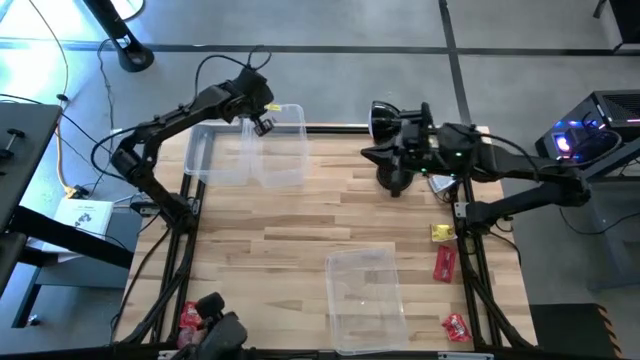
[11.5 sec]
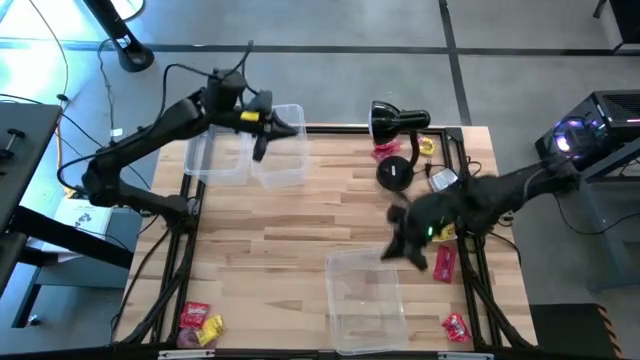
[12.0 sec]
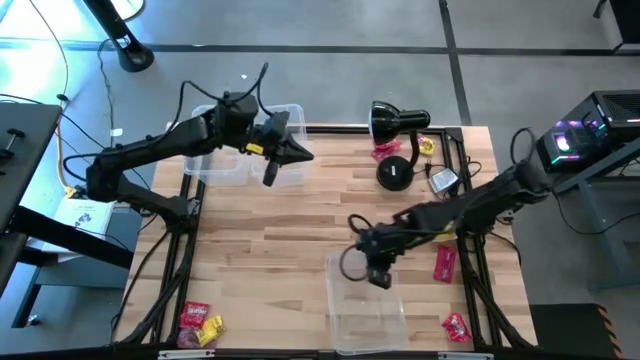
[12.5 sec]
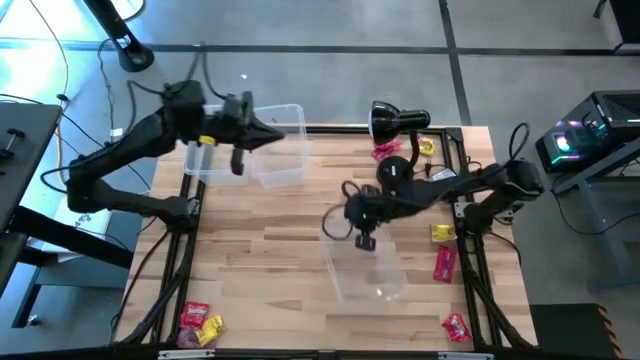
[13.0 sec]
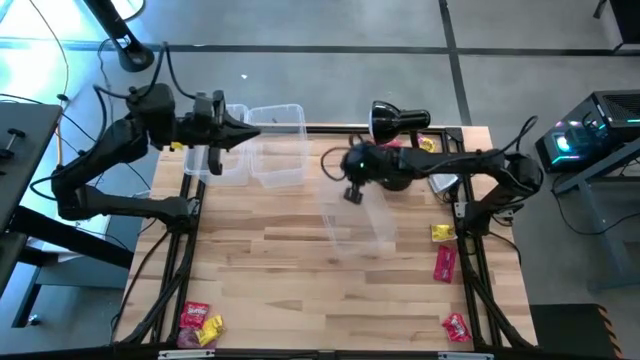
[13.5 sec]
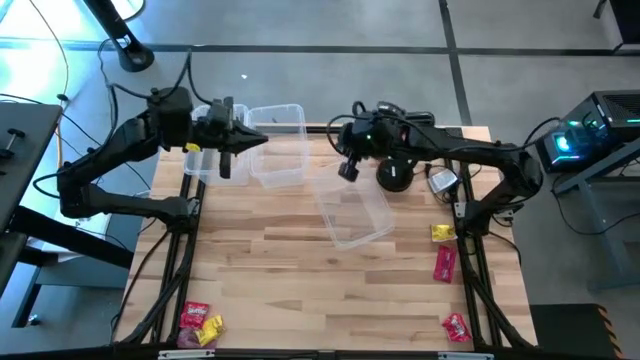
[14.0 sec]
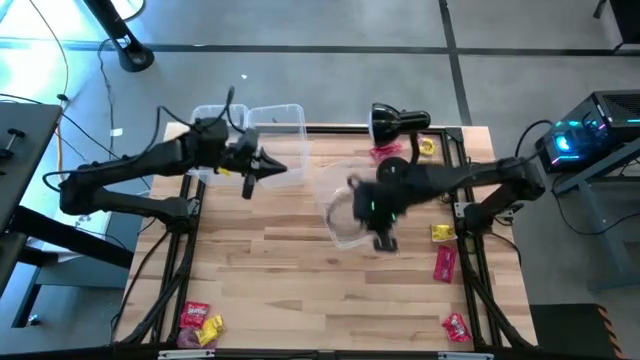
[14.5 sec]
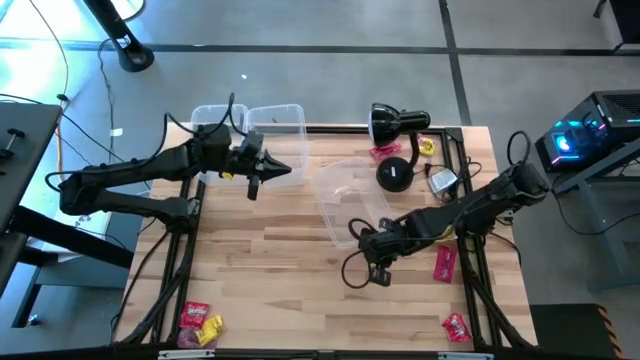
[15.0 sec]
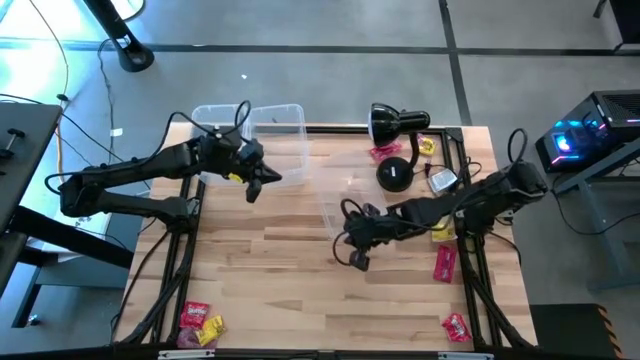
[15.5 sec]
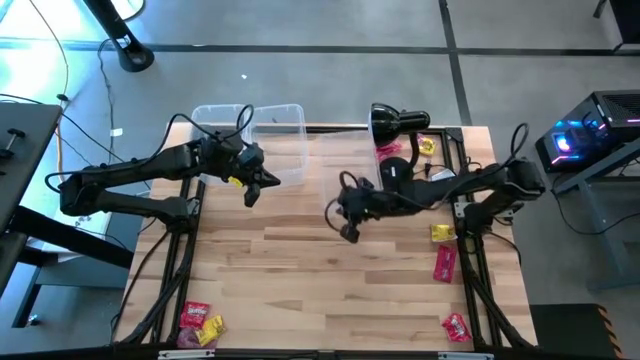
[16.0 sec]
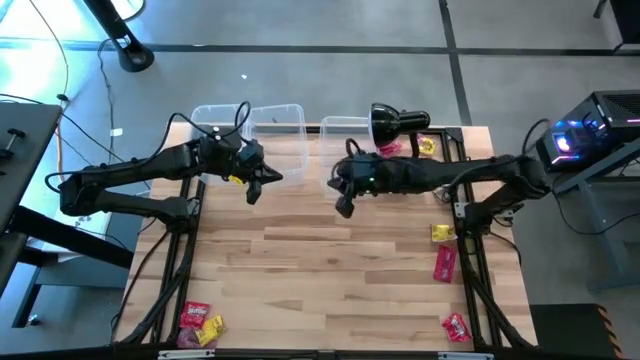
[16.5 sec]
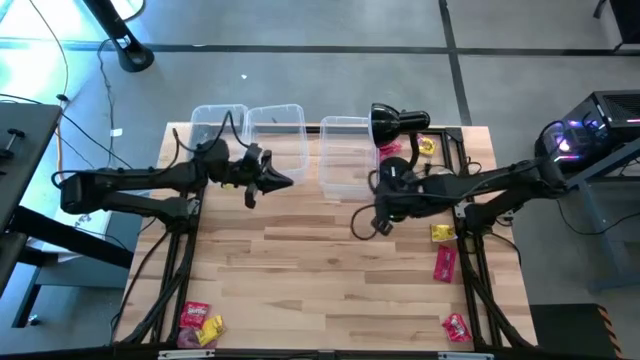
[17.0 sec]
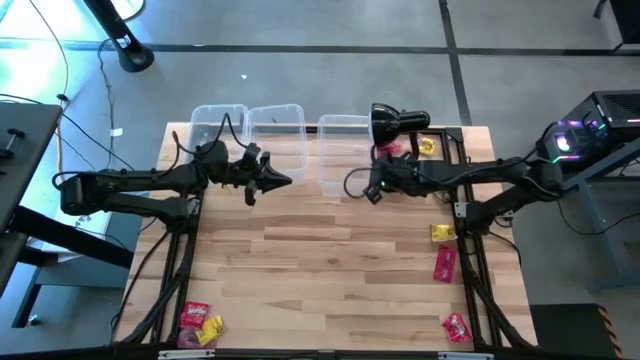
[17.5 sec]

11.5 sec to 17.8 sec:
Task: Sort candy
Move the bottom transparent bin to the top center of the table

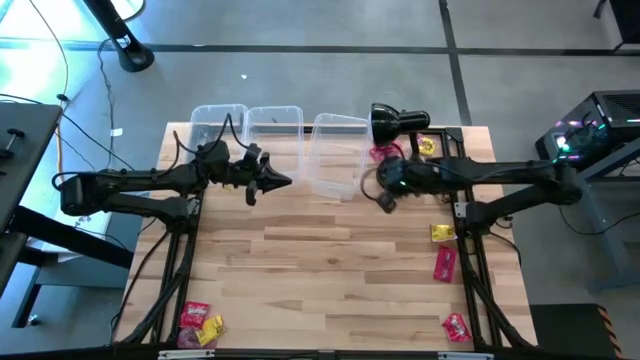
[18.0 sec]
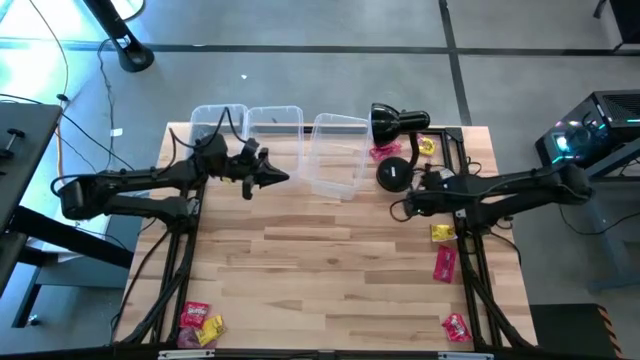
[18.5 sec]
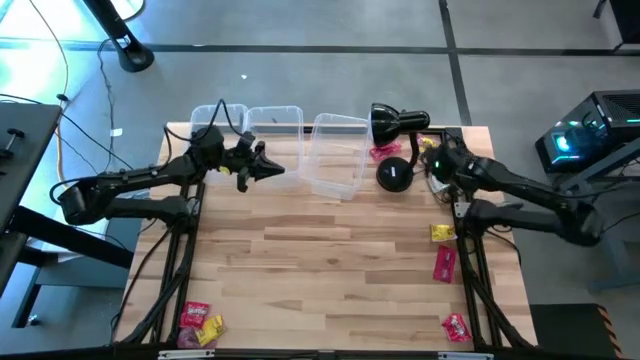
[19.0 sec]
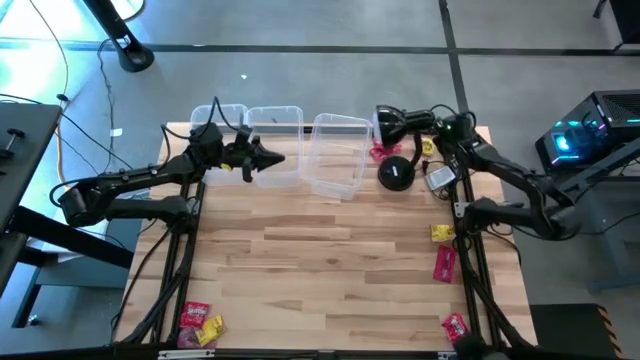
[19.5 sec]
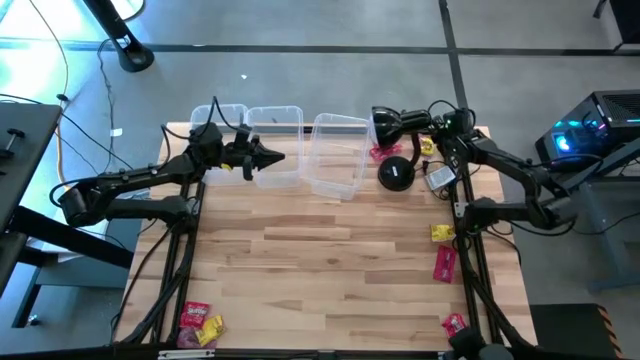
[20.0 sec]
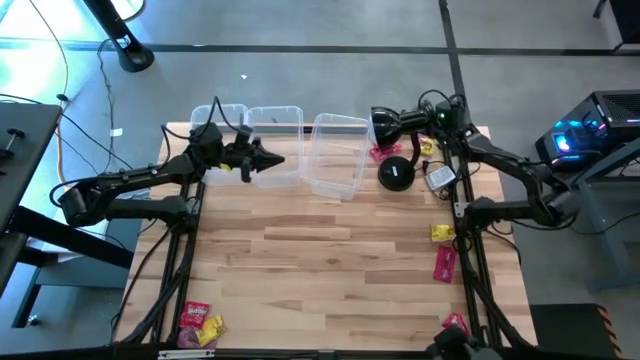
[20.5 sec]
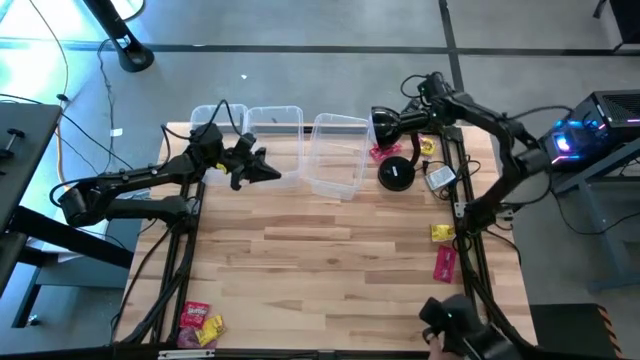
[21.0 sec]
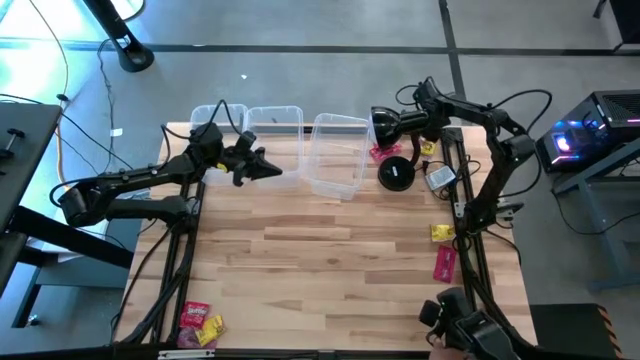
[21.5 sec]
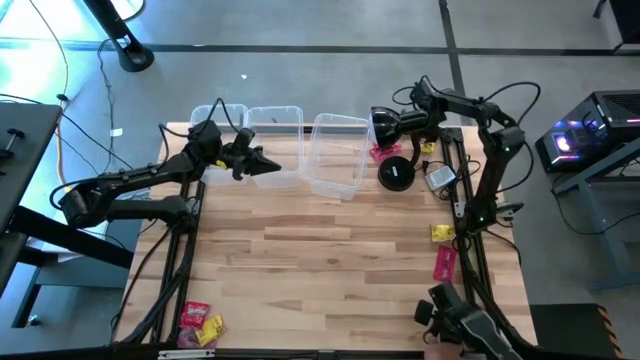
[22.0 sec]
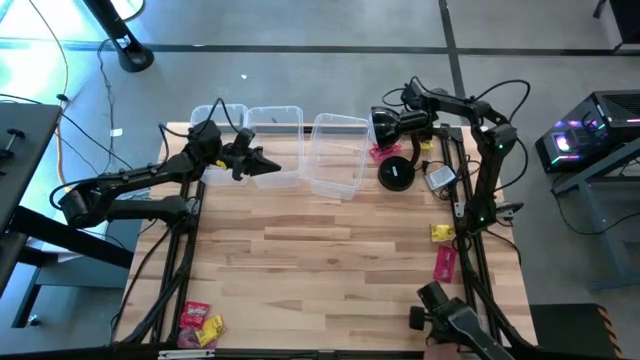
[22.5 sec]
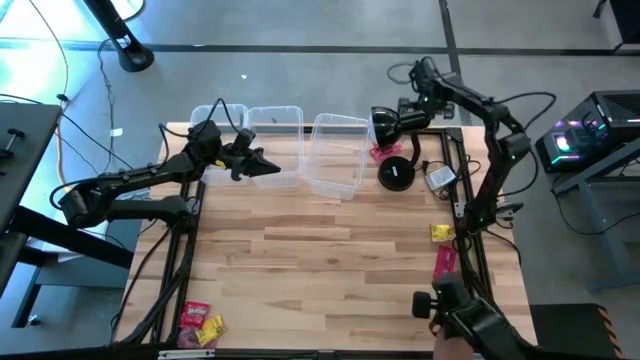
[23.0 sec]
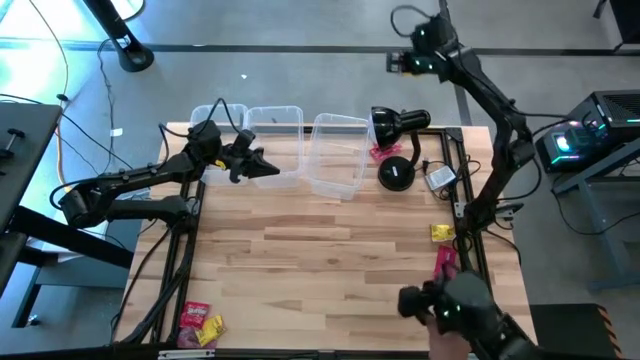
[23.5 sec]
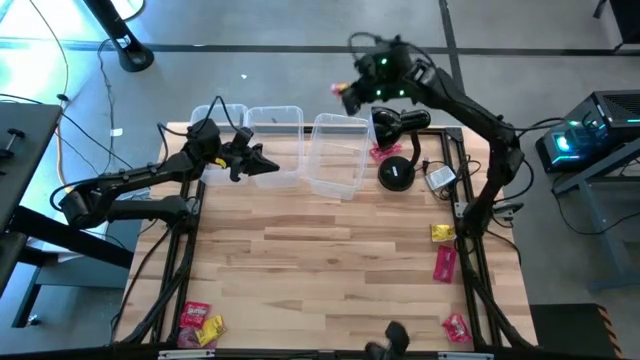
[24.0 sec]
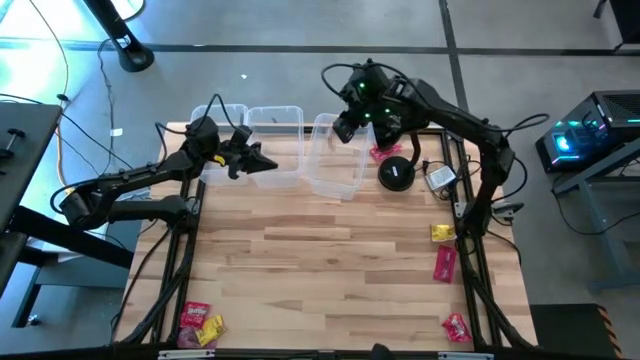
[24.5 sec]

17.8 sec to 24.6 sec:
Put the yellow candy wrapper into the right transparent bin

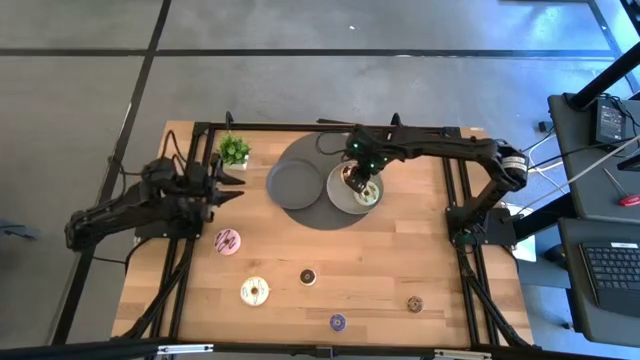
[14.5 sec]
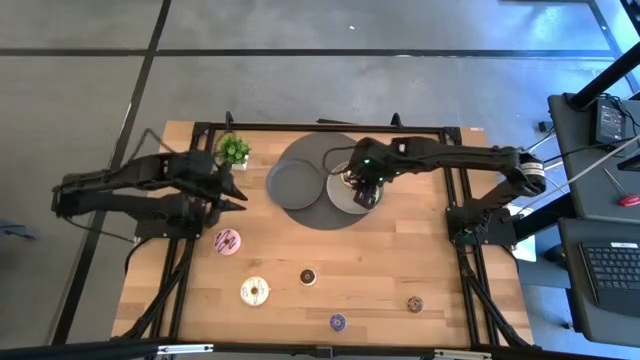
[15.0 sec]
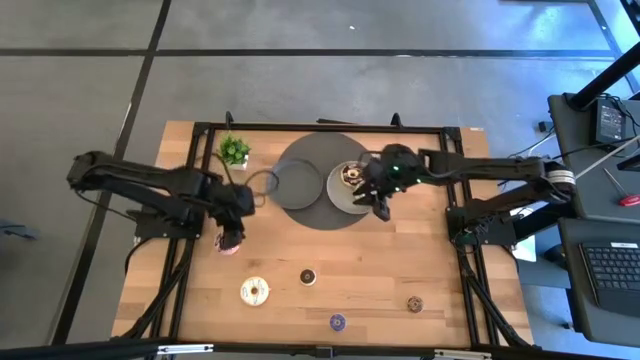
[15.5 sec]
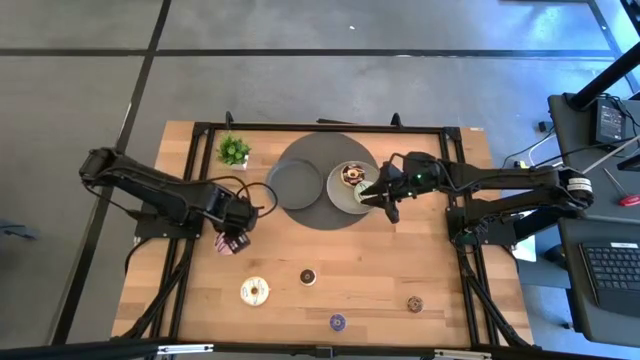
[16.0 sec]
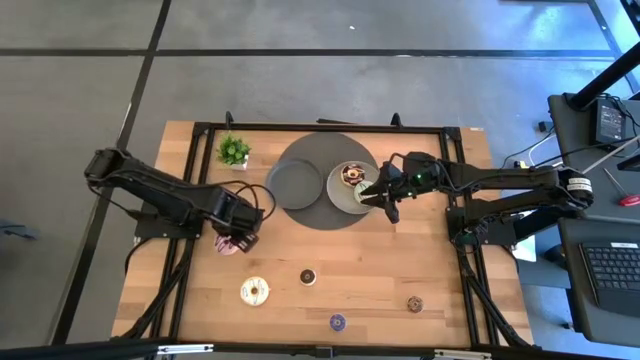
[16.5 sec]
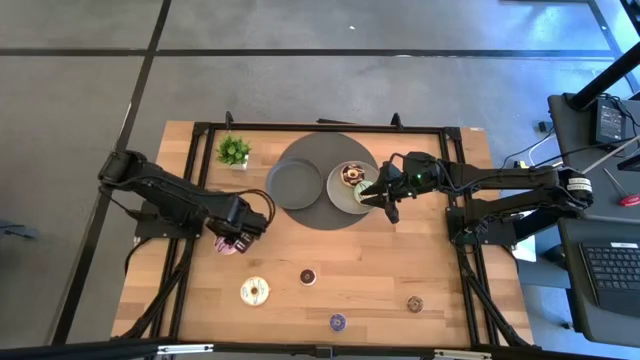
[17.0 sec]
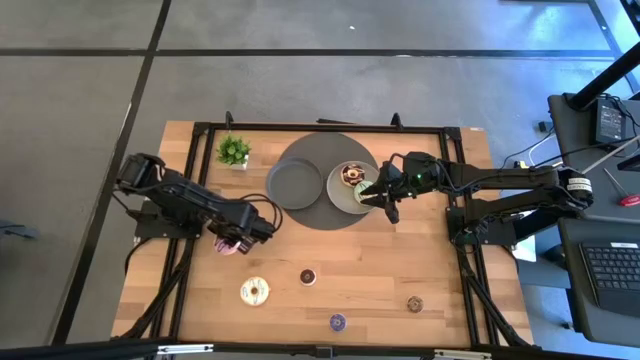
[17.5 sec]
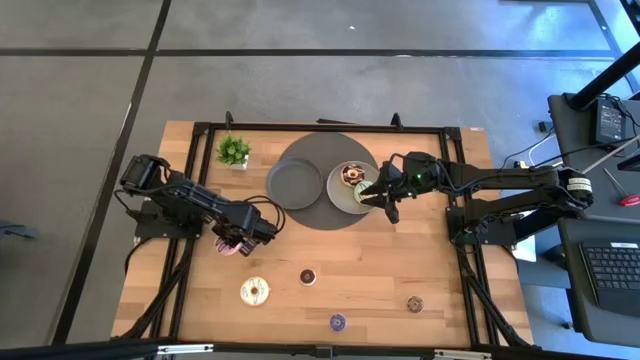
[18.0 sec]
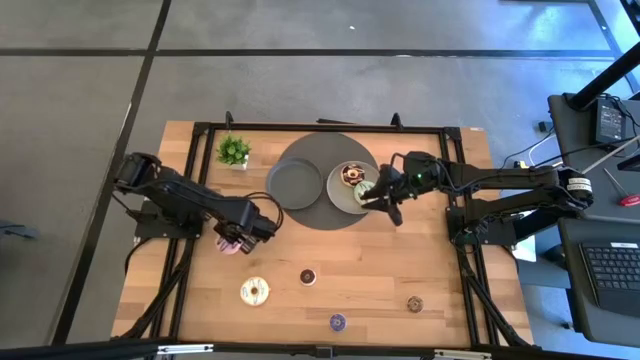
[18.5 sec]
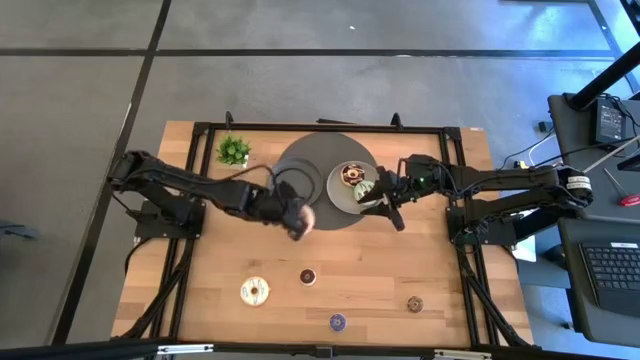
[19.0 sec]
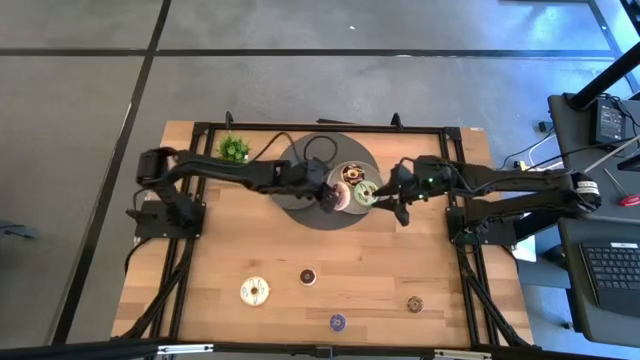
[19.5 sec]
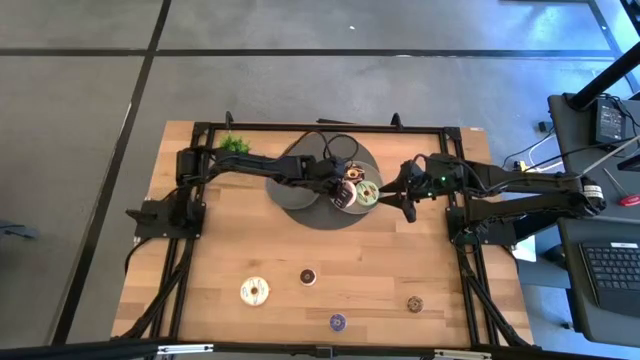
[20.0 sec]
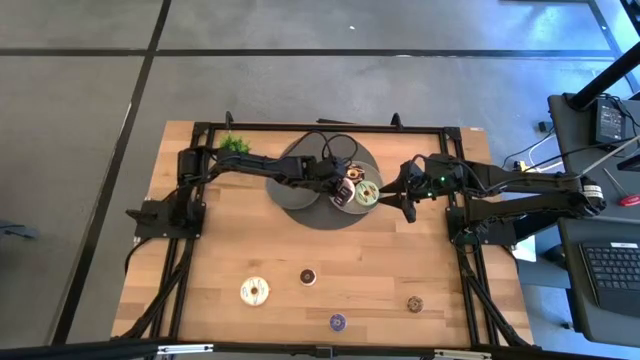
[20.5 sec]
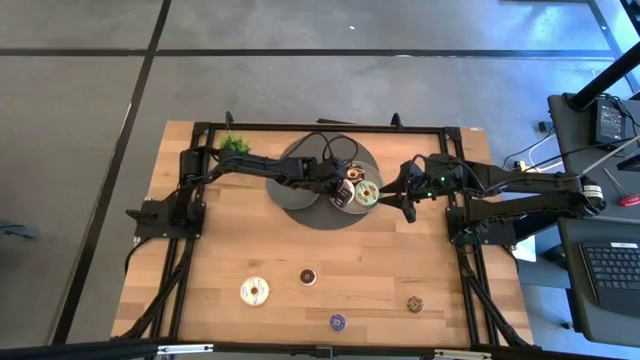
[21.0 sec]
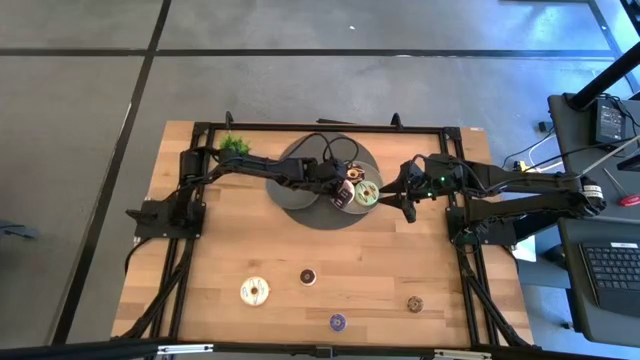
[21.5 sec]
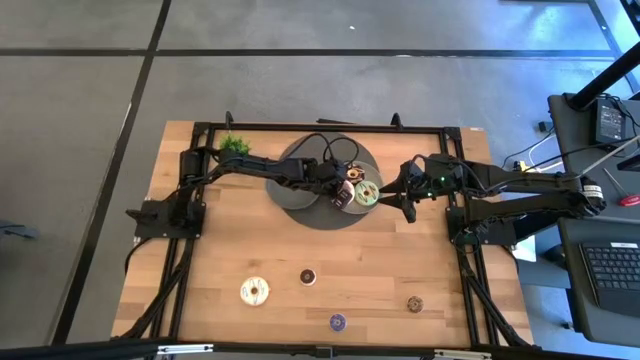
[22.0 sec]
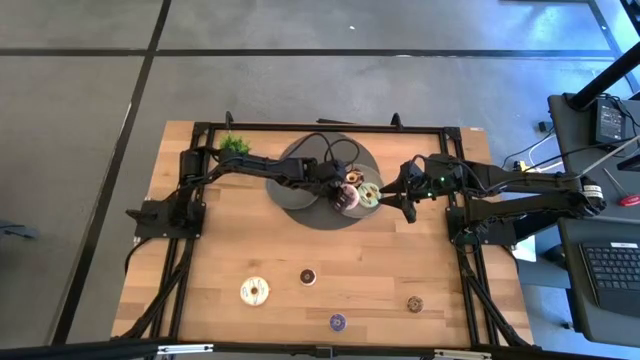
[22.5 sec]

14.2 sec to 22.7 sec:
Task: Pick & Place donuts
Put the large pink donut on the gray plate
